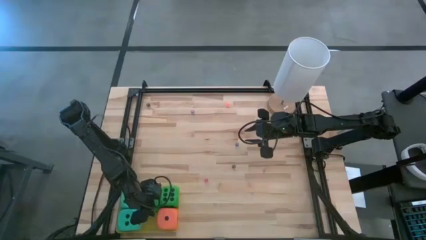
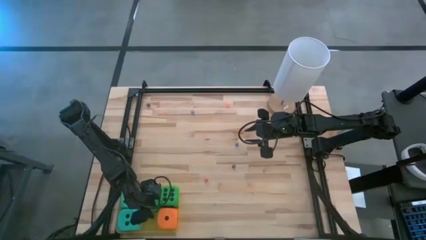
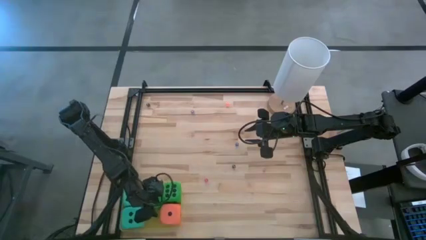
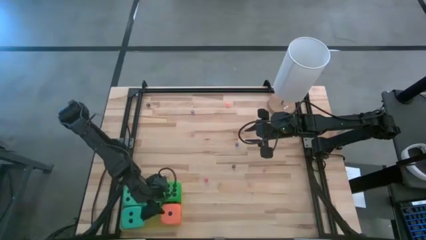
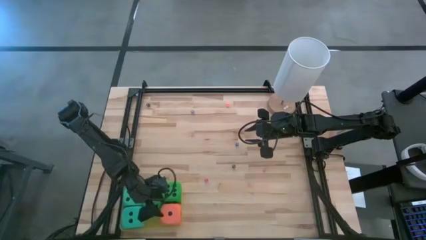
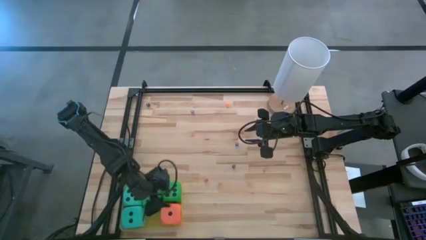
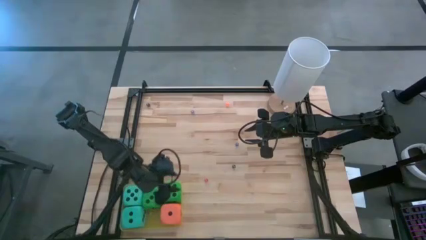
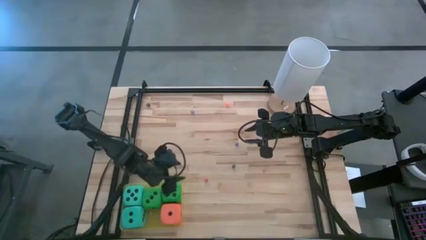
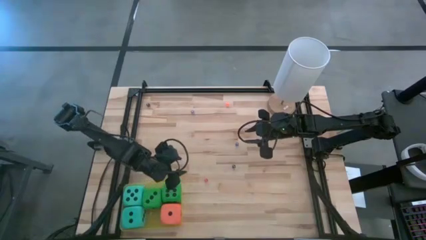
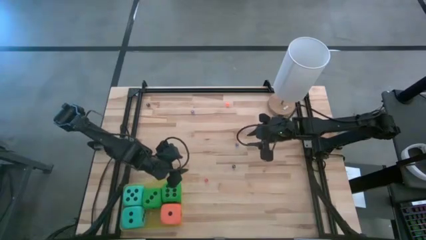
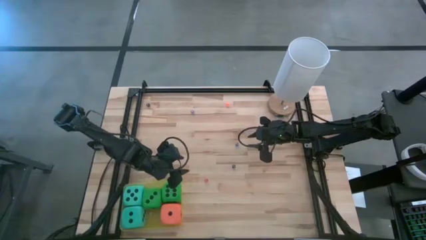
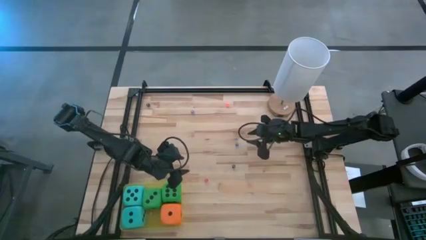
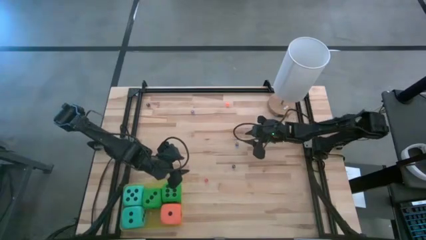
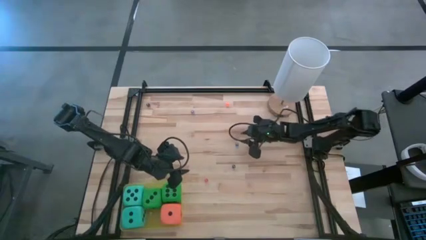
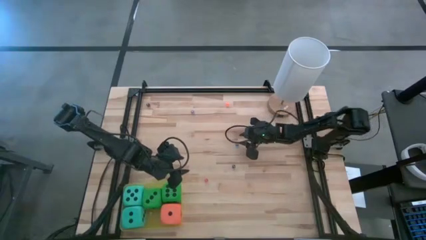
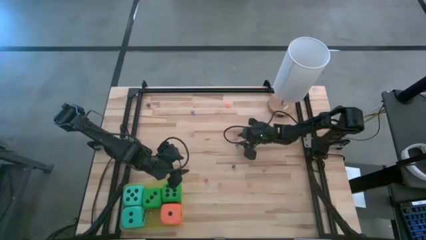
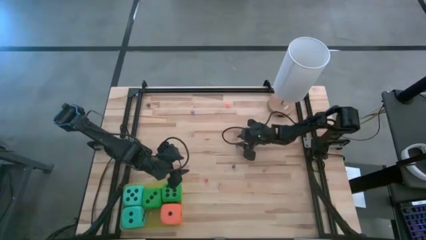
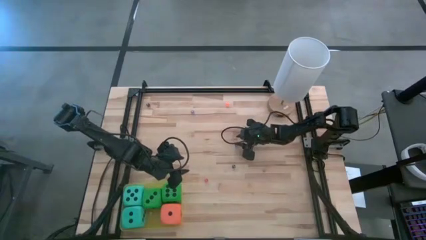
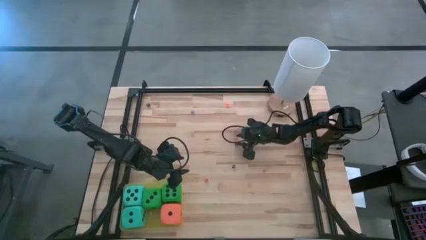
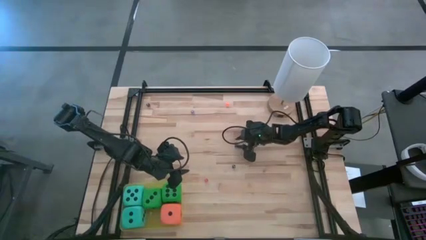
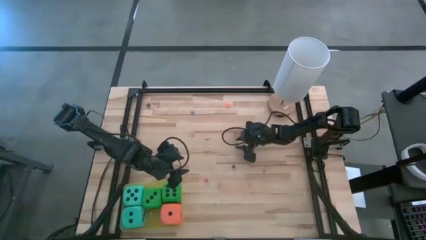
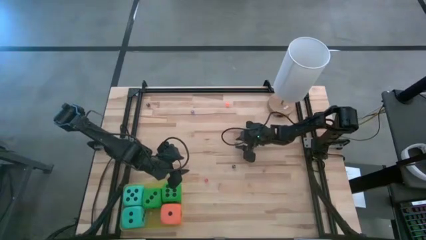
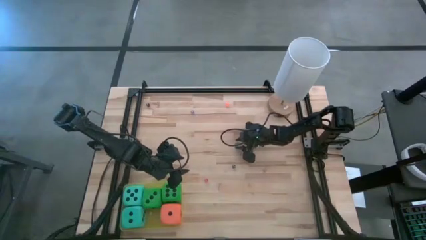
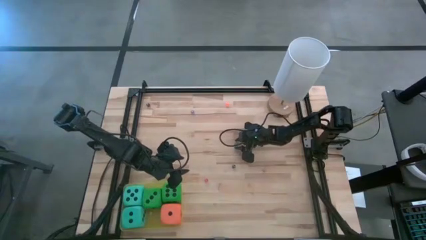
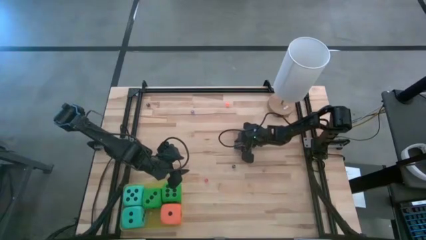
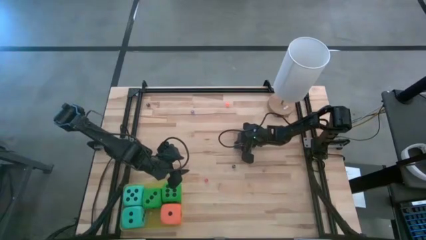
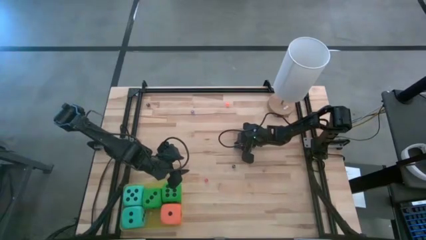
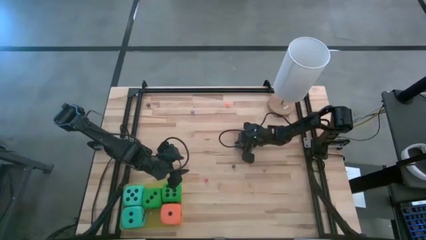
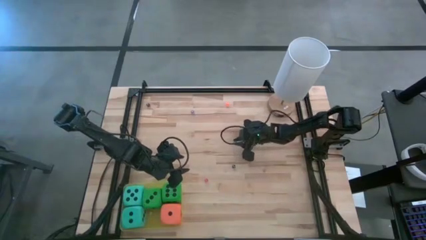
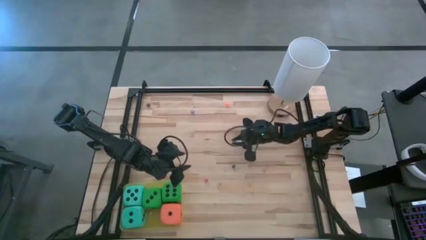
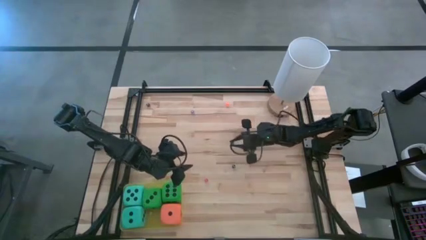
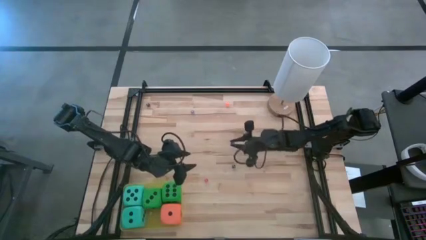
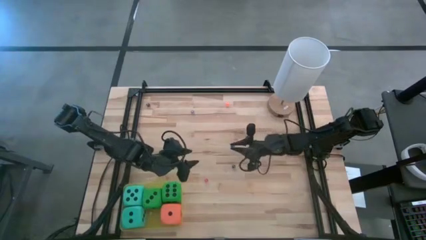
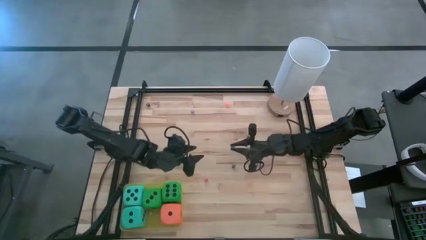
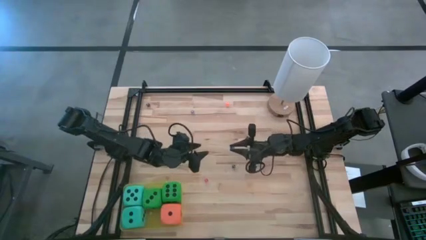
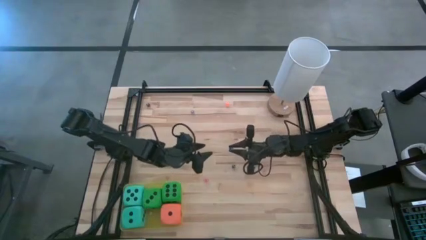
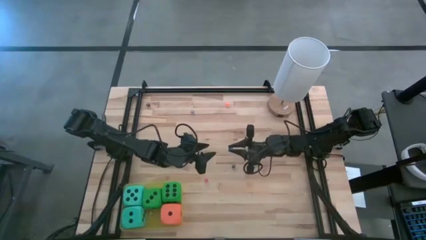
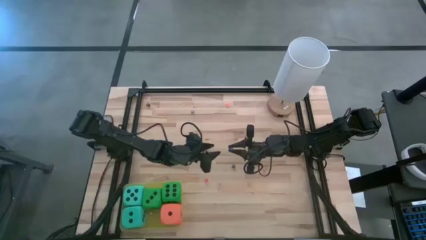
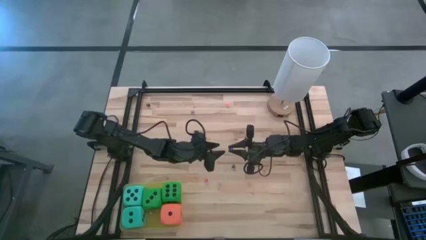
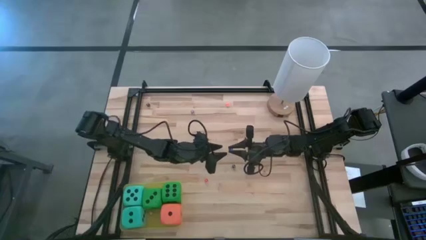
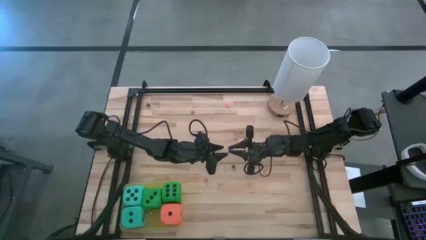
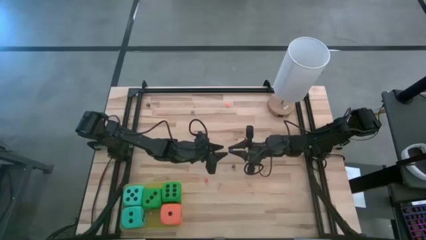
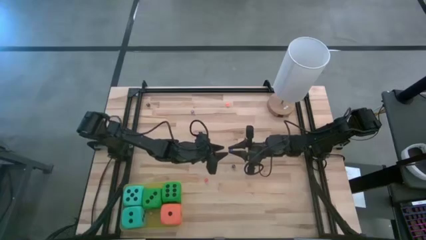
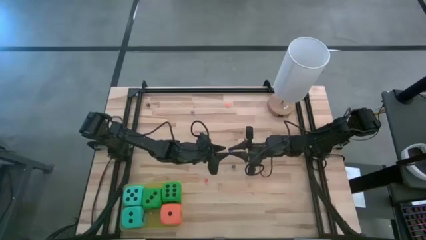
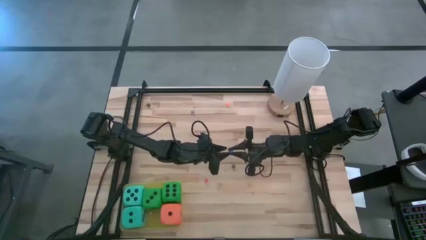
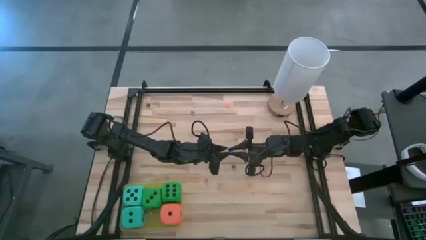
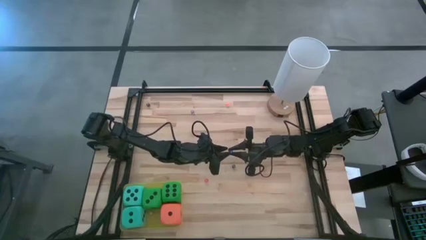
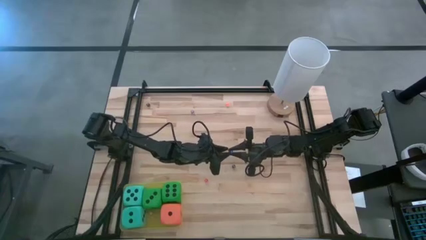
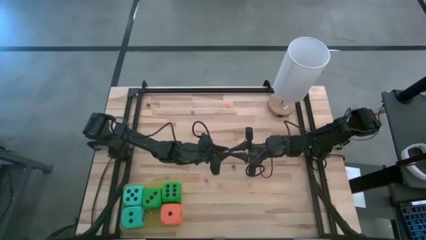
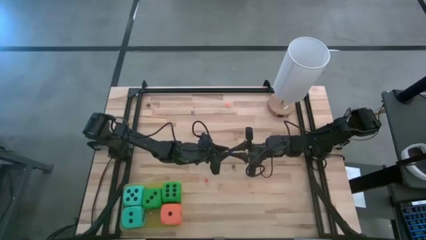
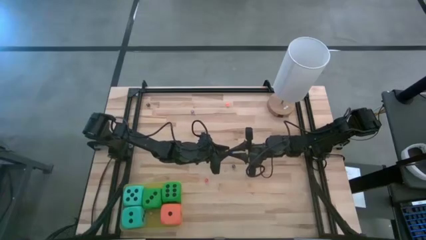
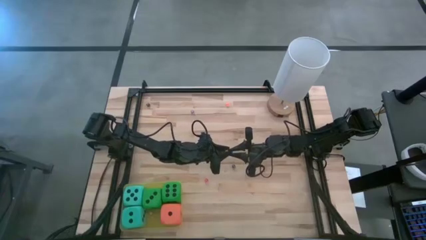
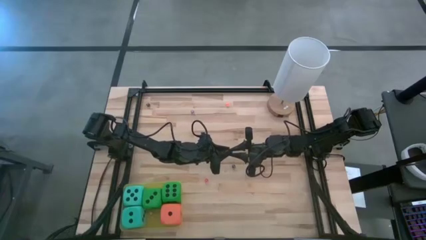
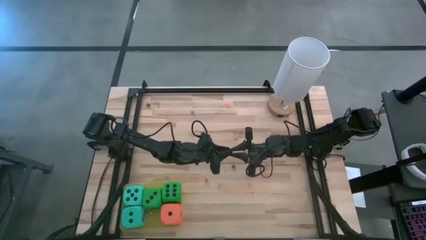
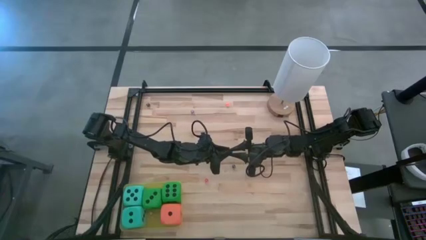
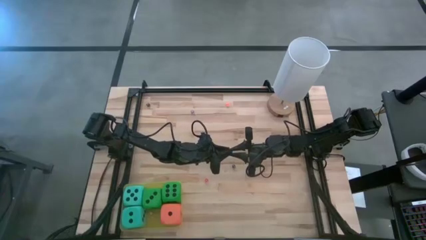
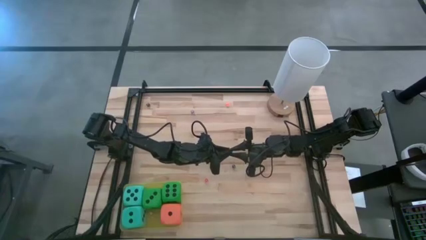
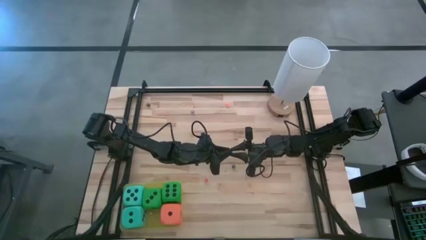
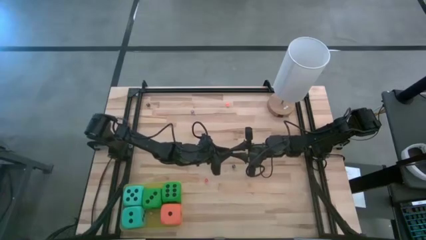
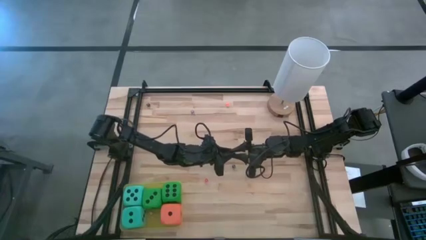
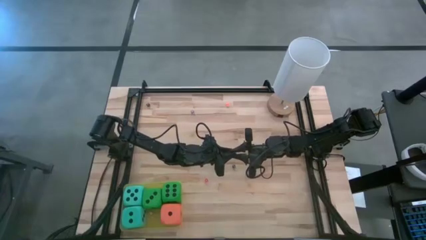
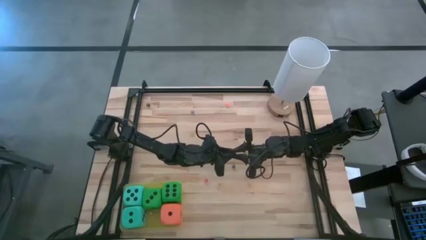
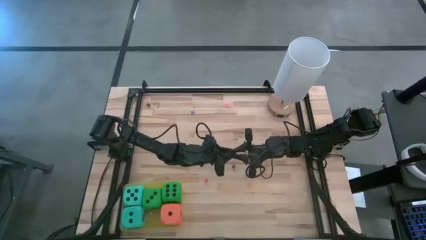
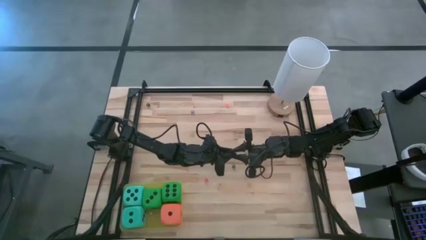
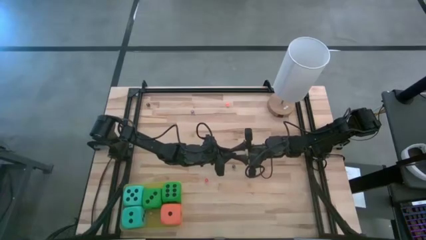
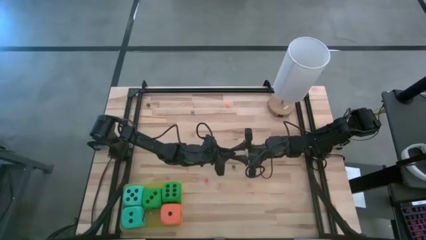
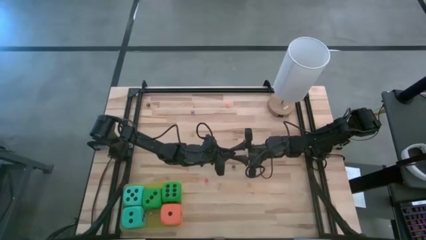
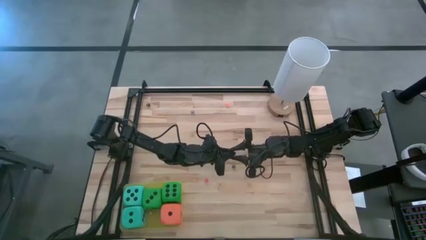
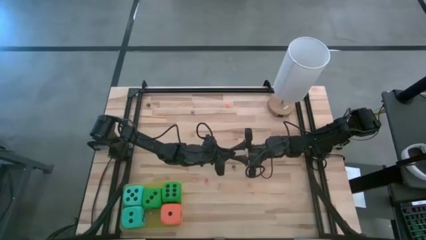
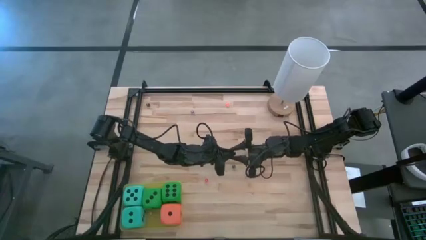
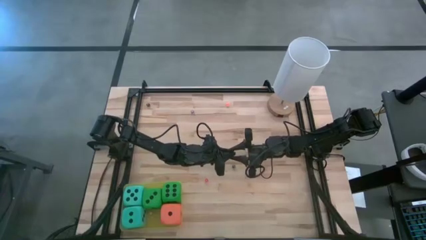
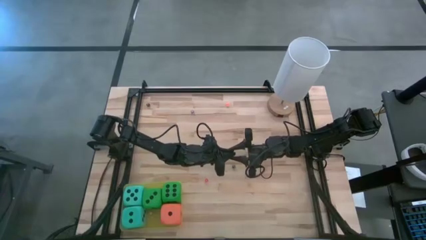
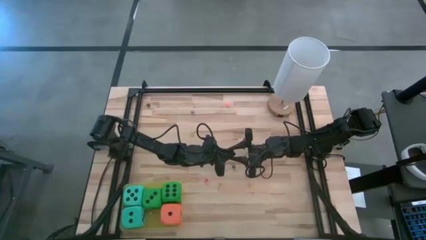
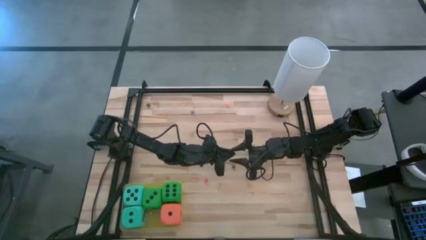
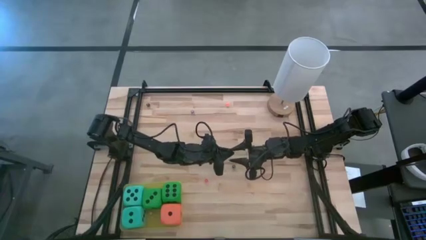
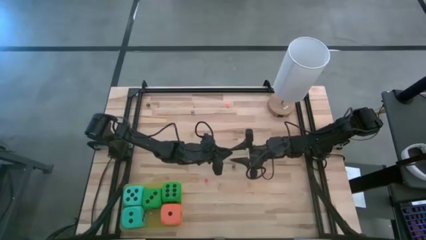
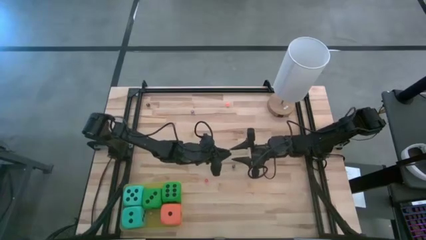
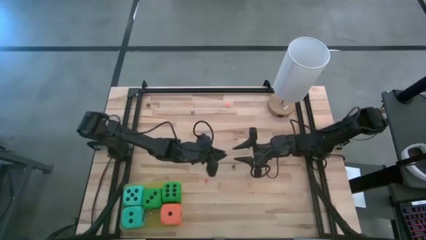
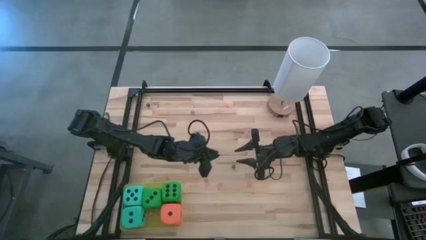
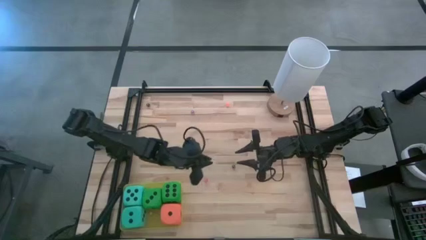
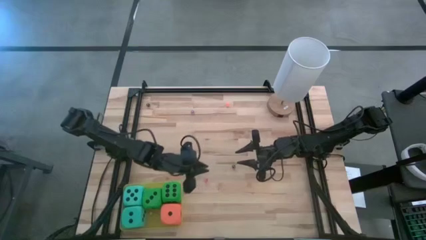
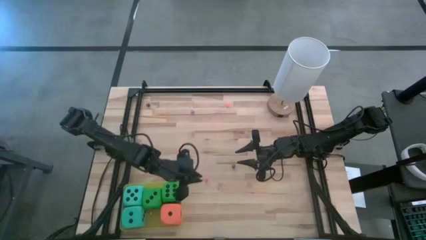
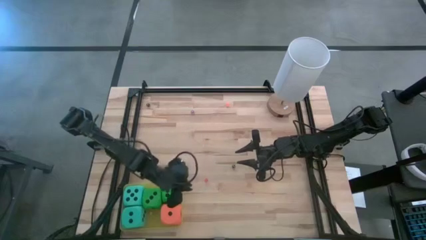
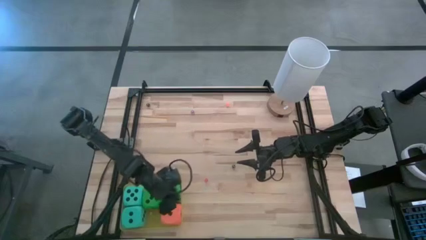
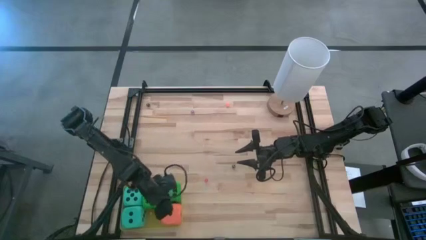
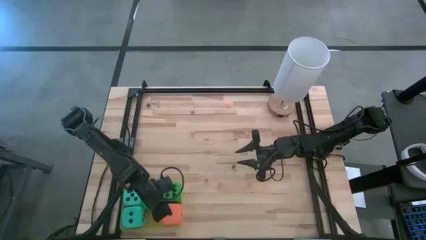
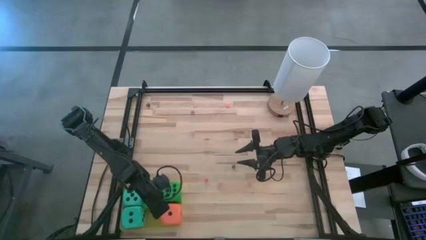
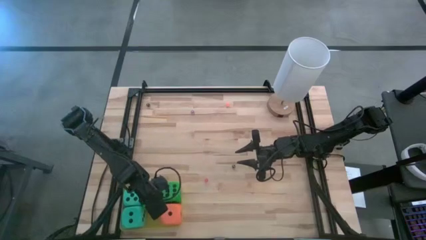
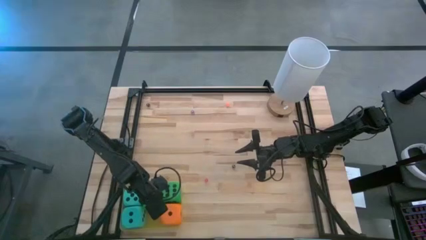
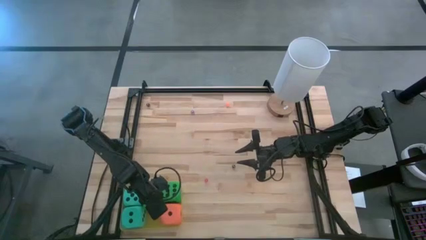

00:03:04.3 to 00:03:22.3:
Task: Pick & Place Dice
Put the blue dice into the yellow bin
